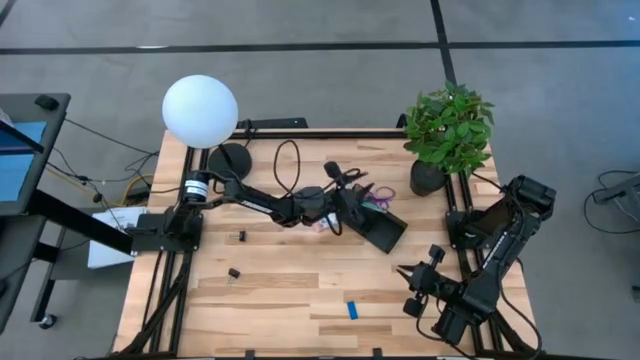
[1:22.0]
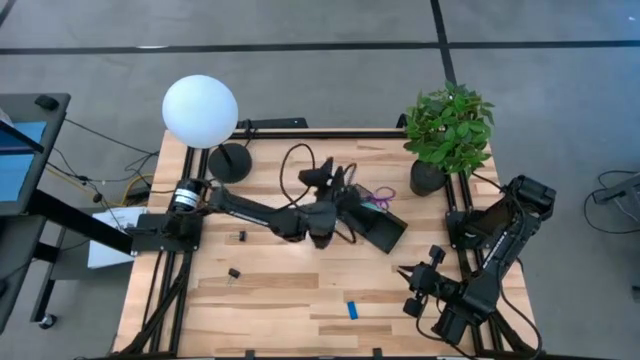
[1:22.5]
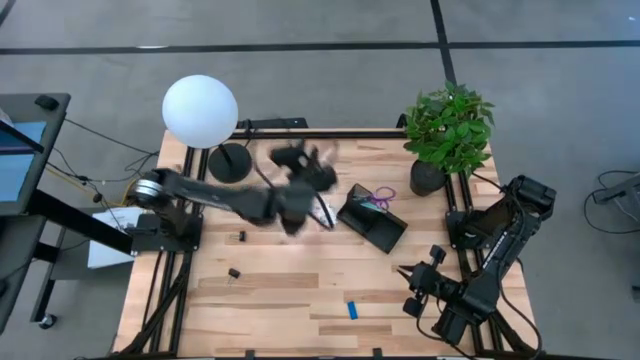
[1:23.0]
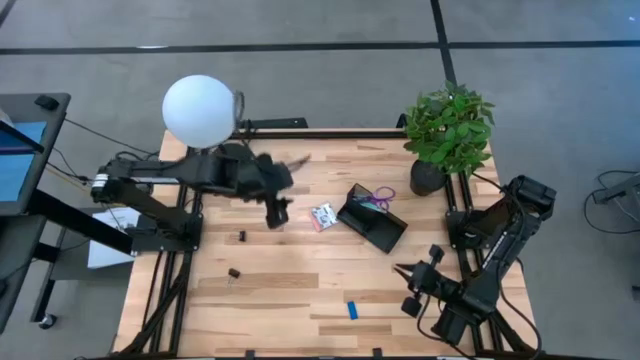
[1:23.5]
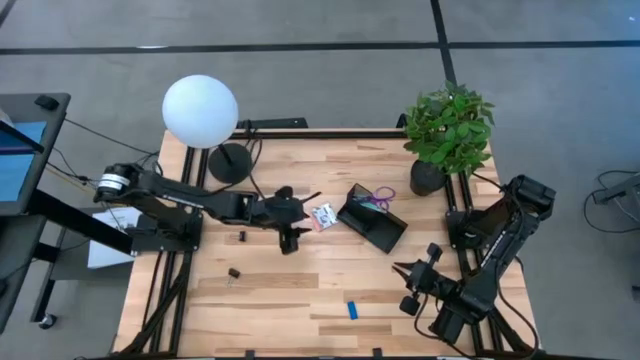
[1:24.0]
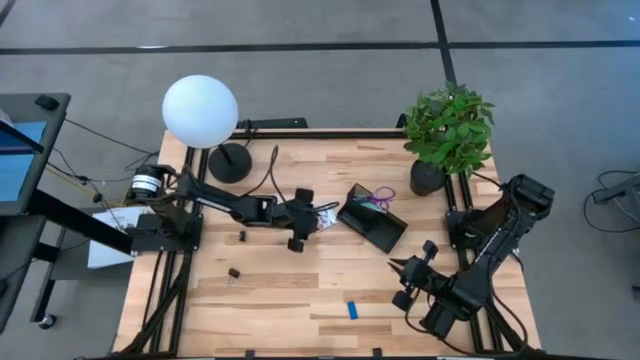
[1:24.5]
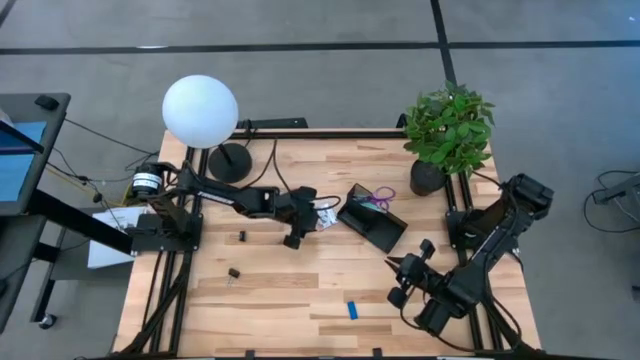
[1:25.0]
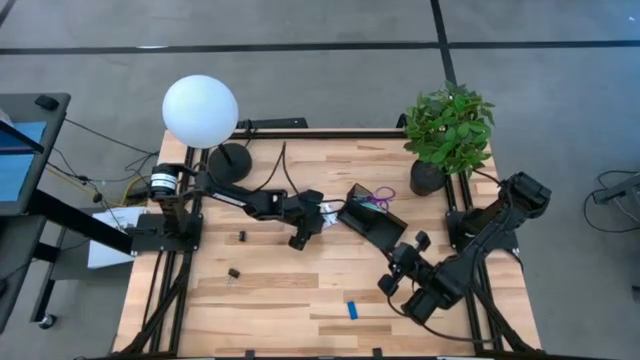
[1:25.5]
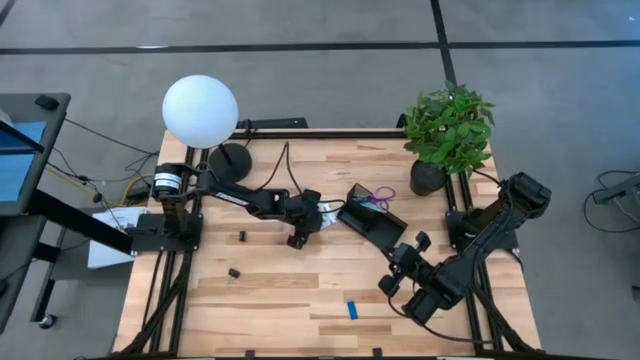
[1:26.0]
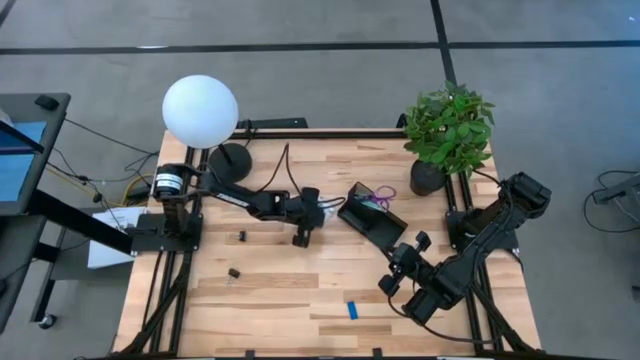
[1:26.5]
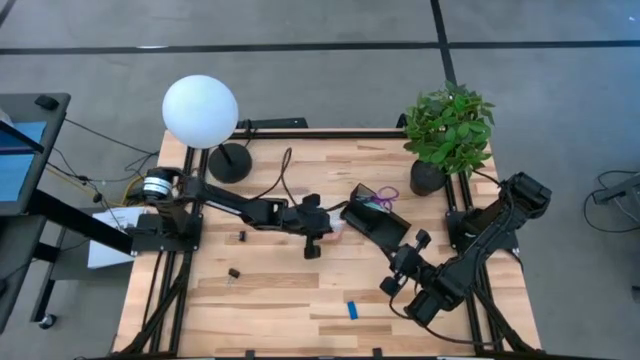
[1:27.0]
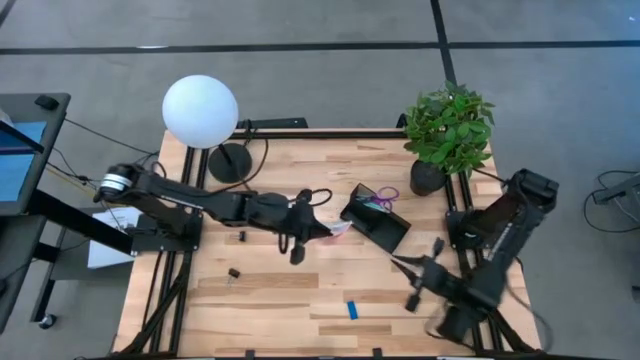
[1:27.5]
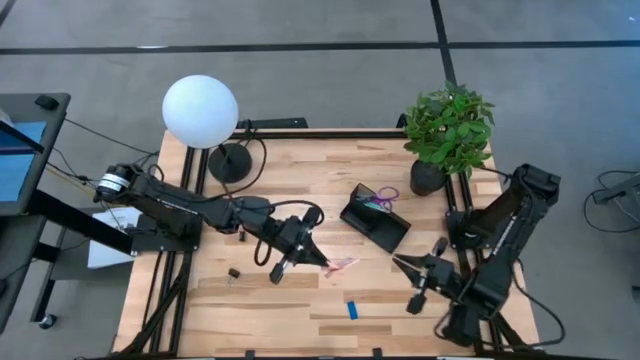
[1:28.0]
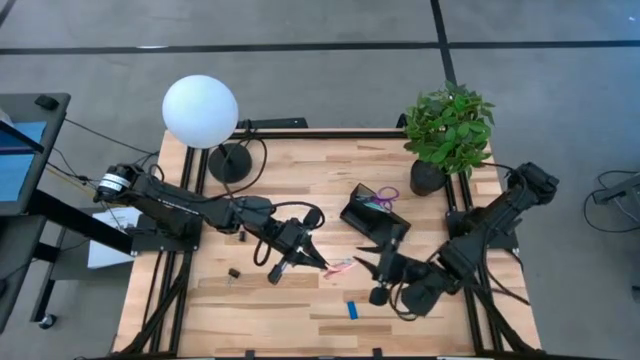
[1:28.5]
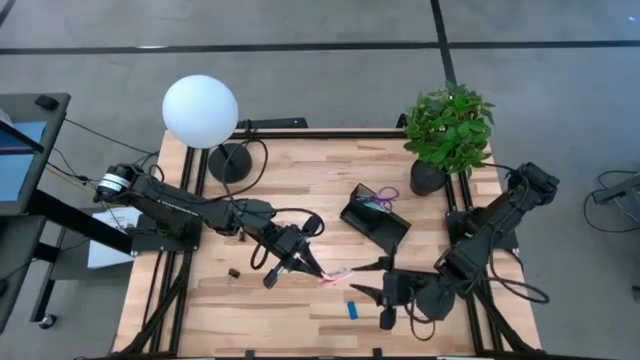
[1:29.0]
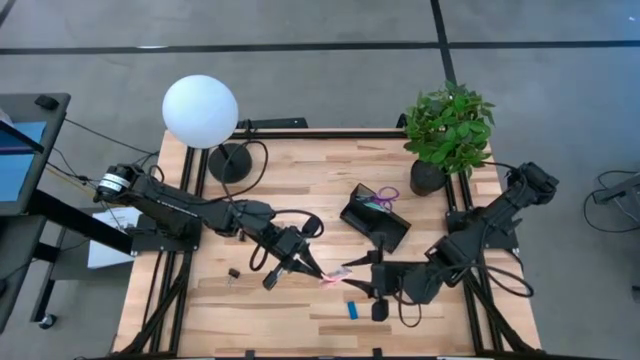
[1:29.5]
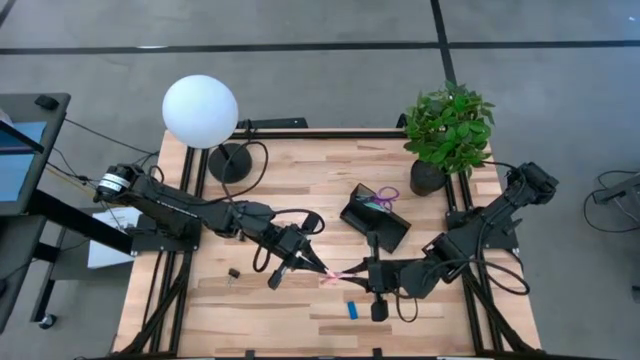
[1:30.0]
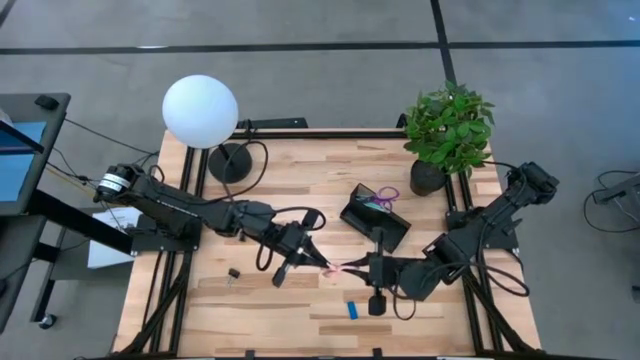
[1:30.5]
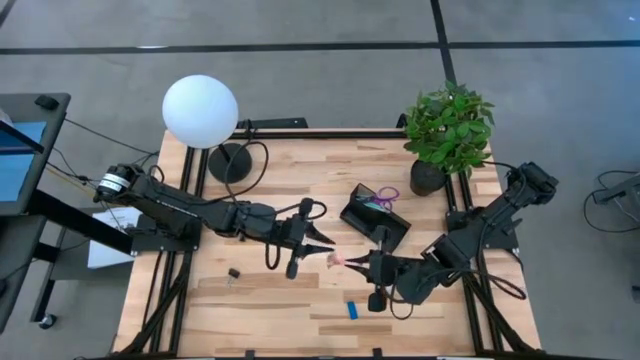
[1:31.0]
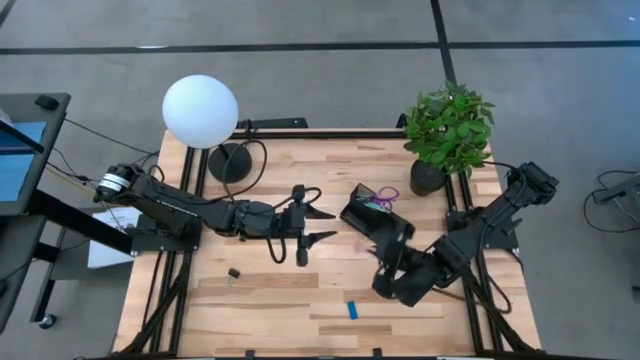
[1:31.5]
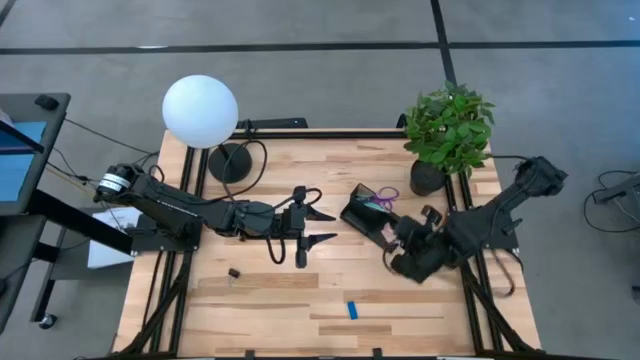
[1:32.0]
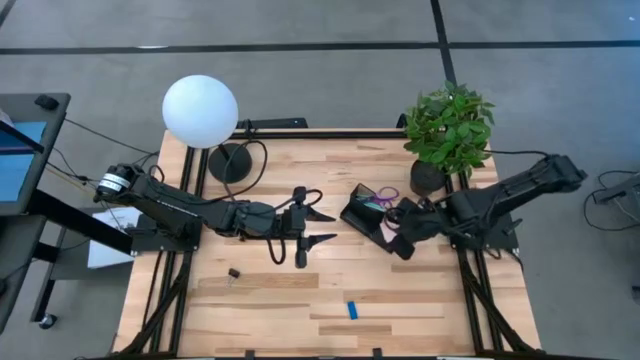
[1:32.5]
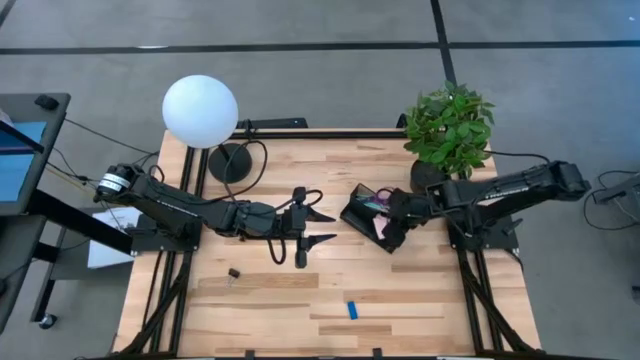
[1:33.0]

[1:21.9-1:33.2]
Task: Pick and place office supplies into organizer
Put the pink sticky notes into the black desk organizer

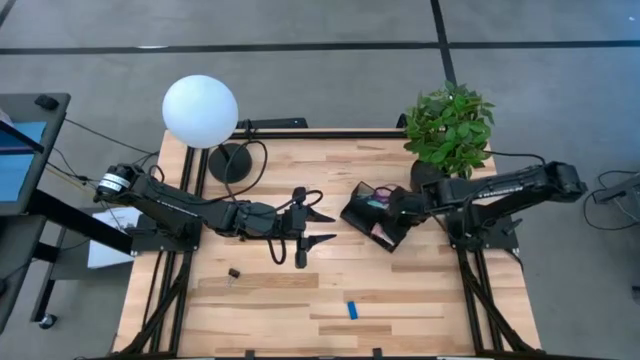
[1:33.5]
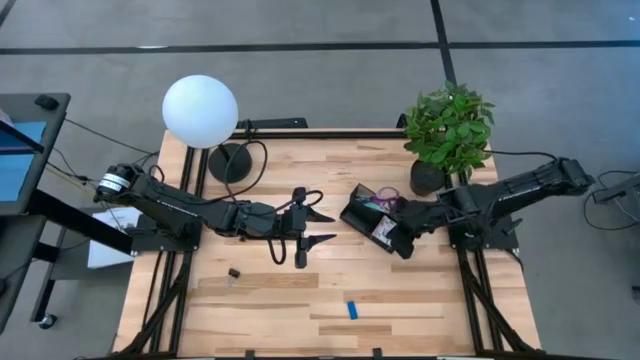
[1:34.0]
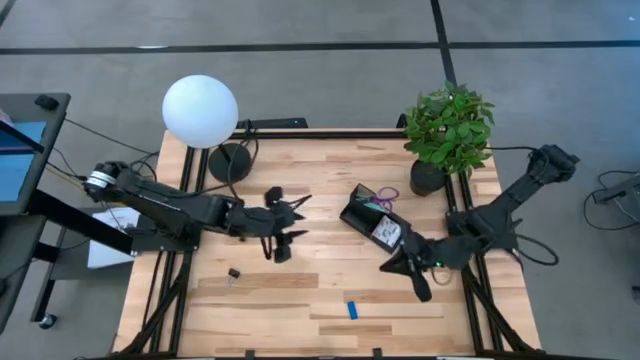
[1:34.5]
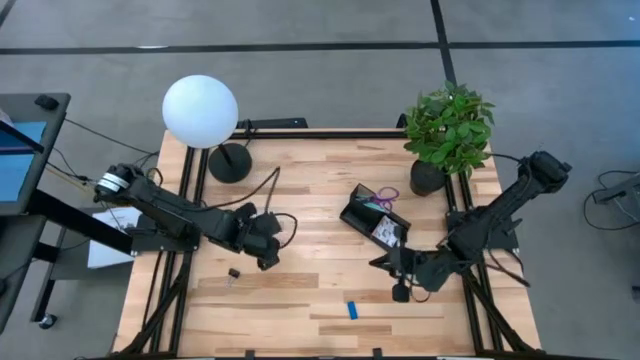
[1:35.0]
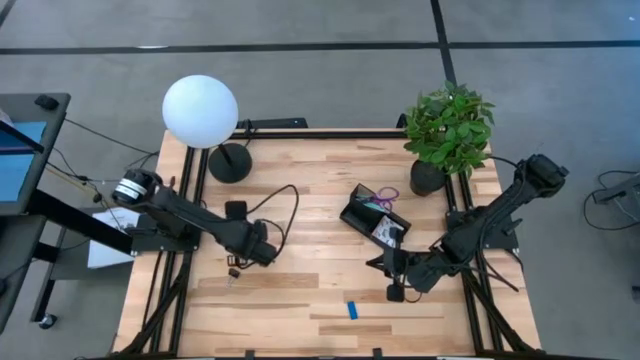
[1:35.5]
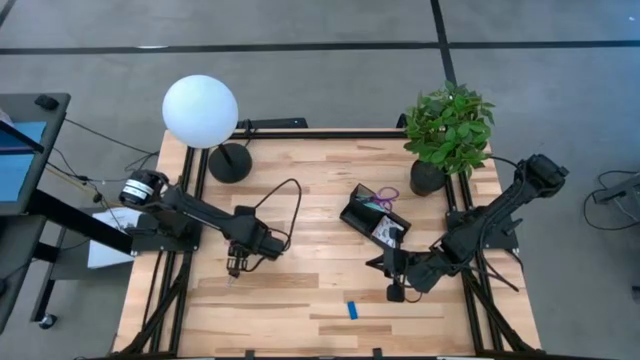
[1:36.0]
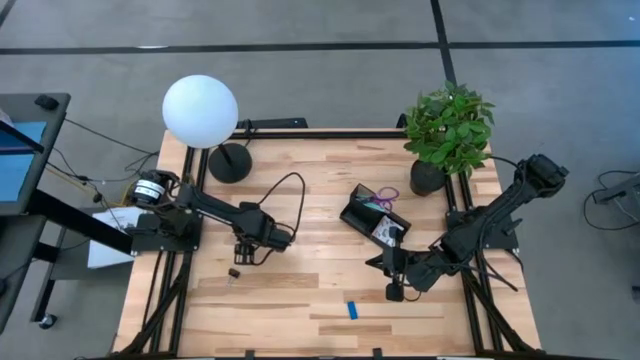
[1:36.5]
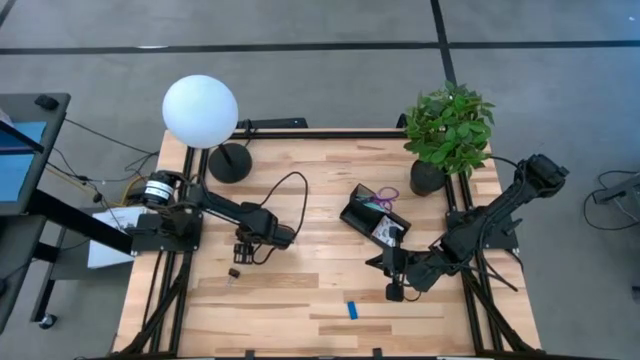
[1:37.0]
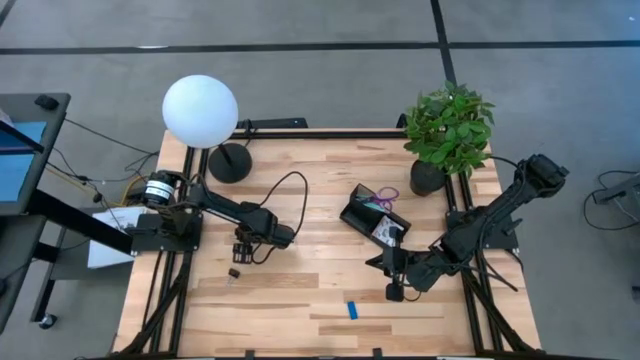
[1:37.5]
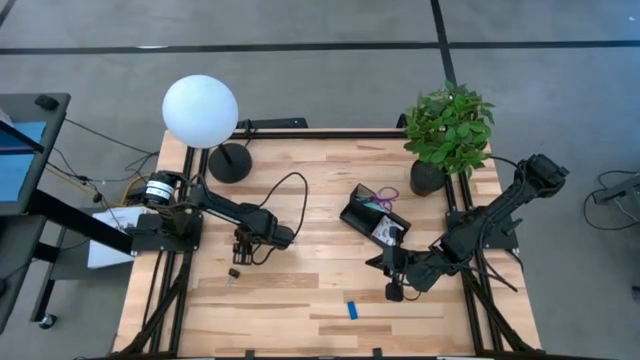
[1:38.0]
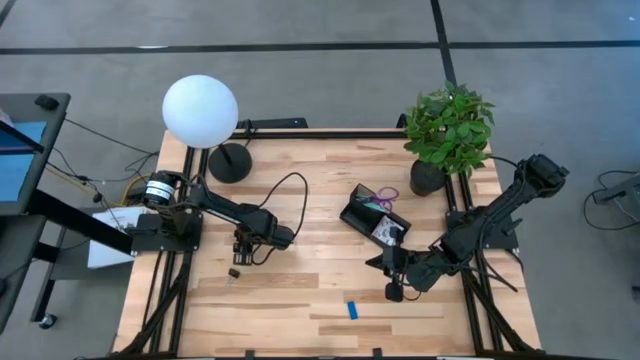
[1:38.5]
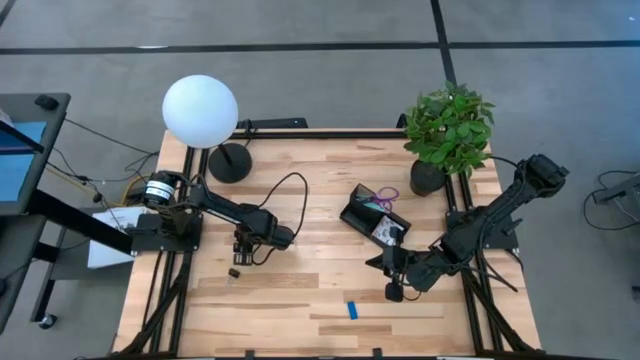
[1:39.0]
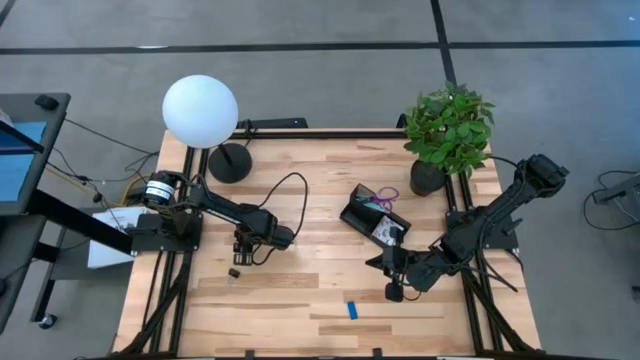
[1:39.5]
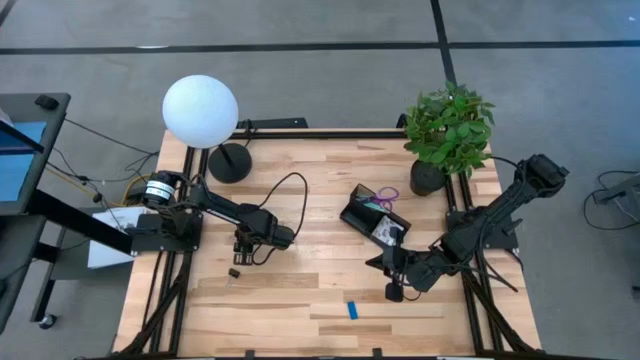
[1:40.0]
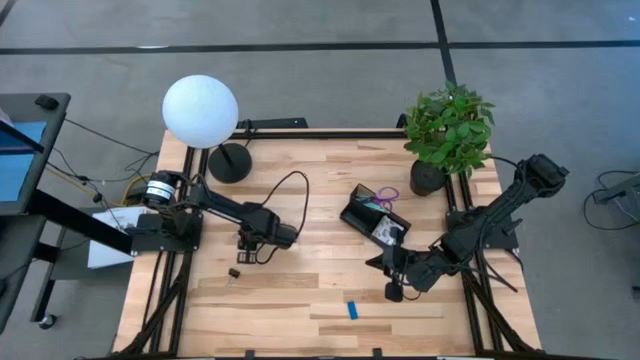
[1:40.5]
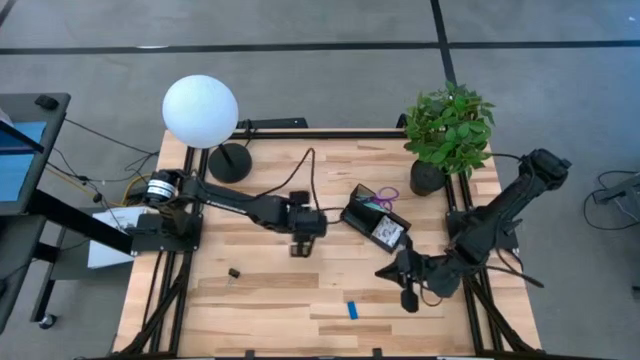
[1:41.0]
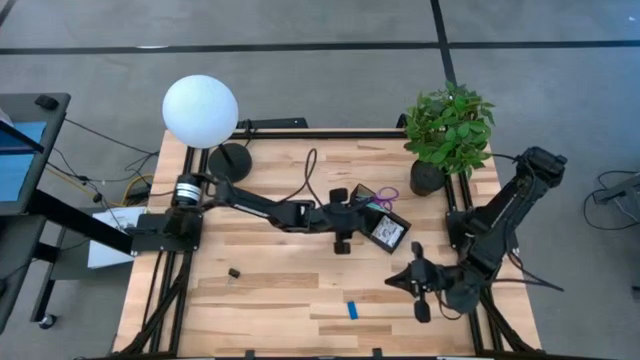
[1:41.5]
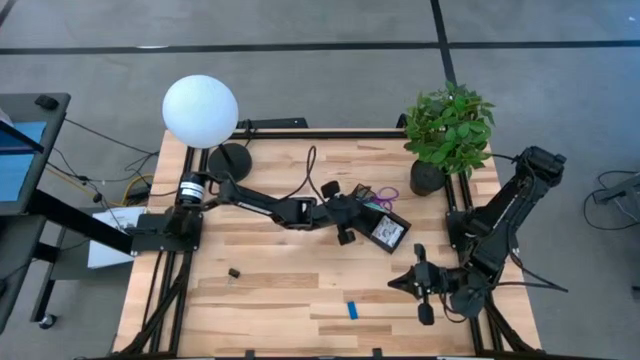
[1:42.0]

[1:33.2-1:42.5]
Put the black binder clip into the black desk organizer

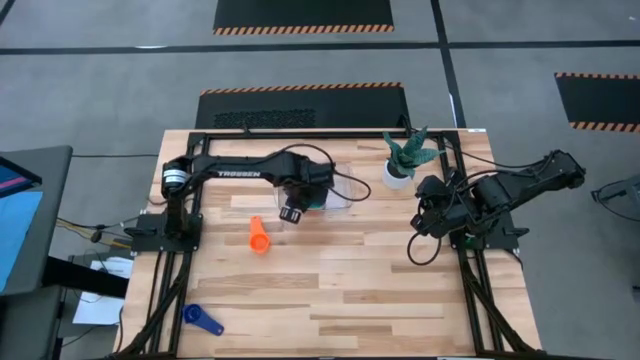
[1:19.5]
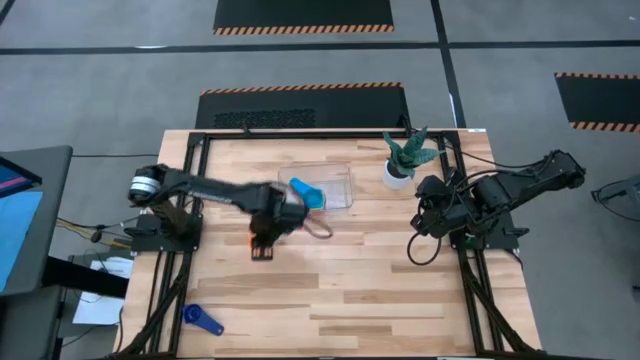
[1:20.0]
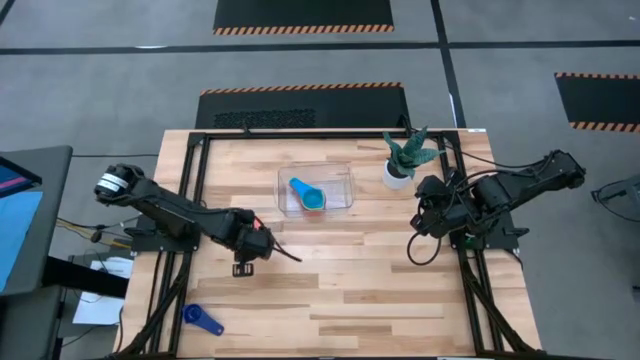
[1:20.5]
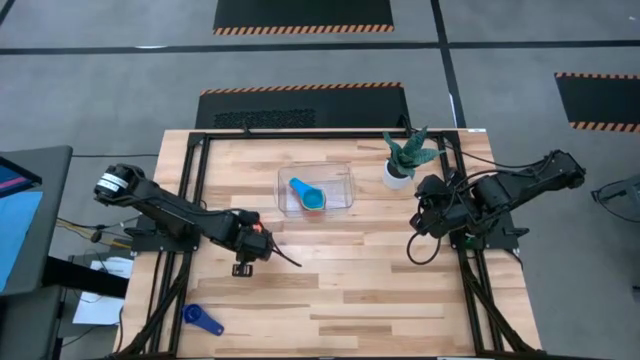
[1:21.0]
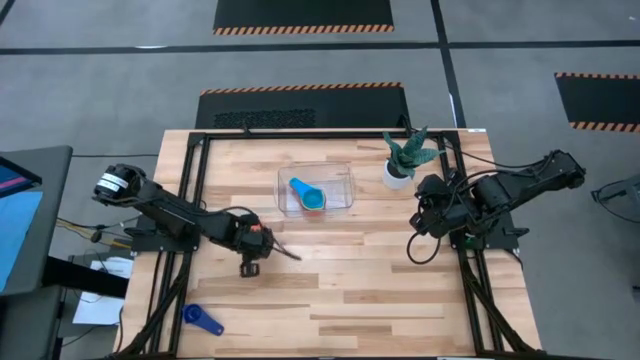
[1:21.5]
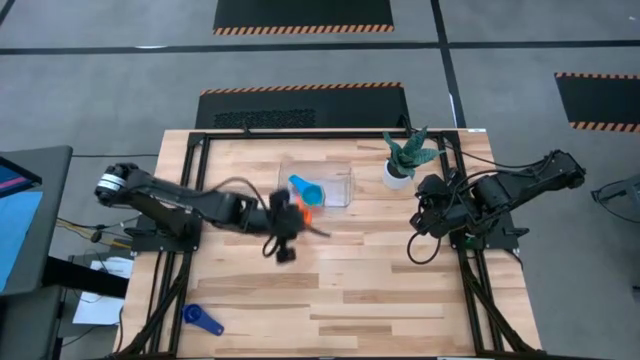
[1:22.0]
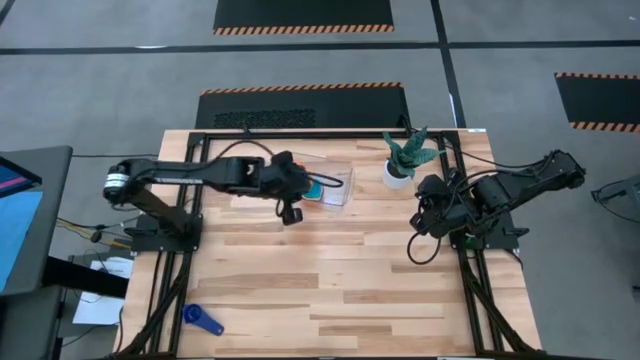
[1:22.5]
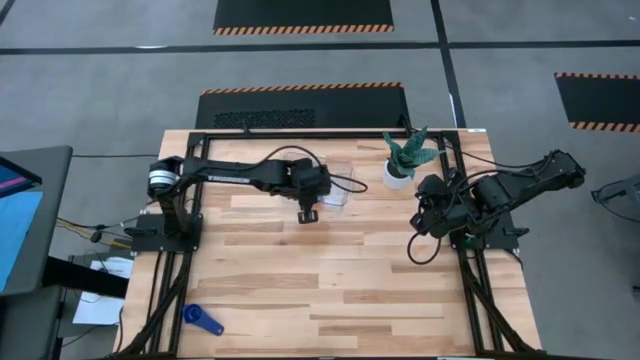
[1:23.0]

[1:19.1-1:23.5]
Task: Nest measuring cups in basket
Stack the orange measuring cup on top of the light blue measuring cup in the transparent bin
